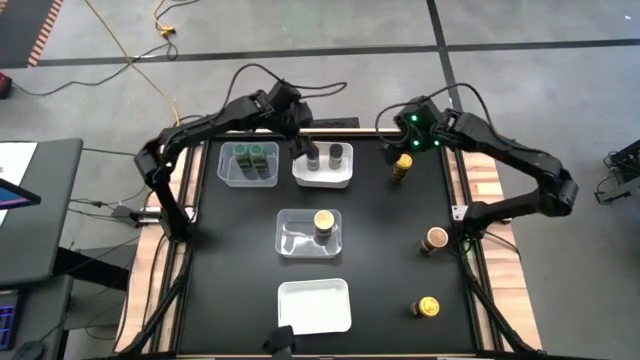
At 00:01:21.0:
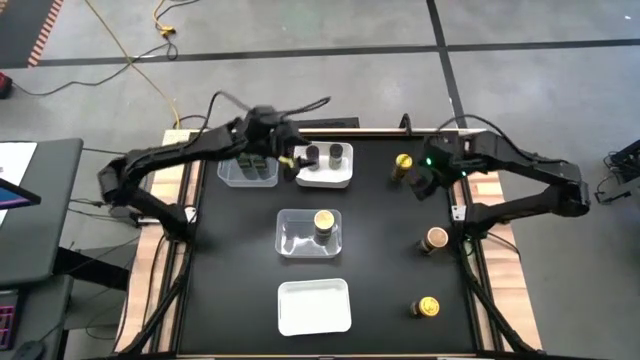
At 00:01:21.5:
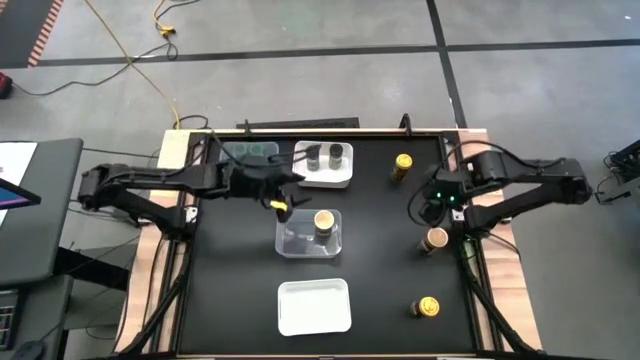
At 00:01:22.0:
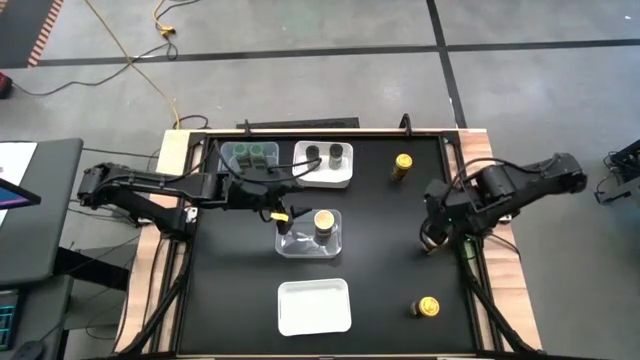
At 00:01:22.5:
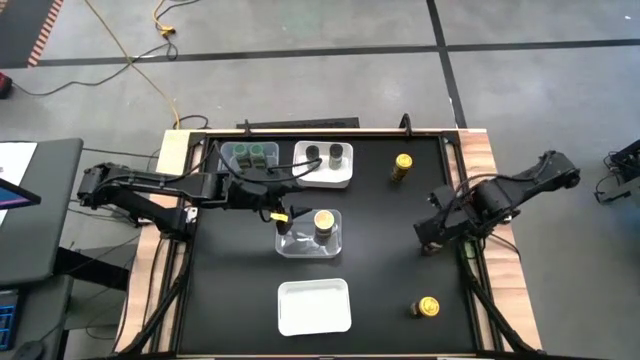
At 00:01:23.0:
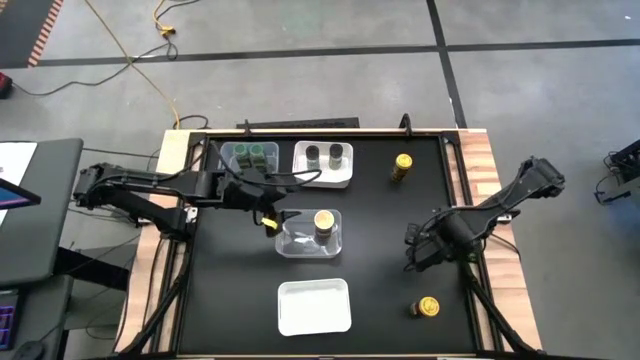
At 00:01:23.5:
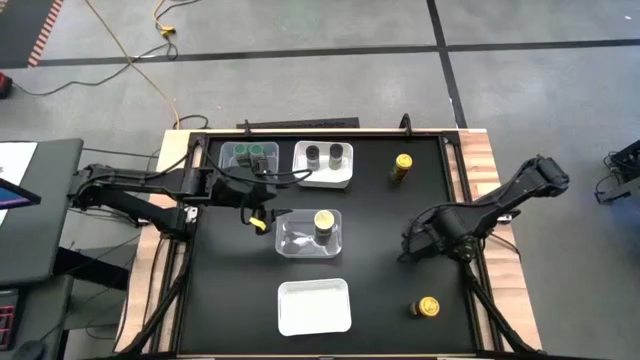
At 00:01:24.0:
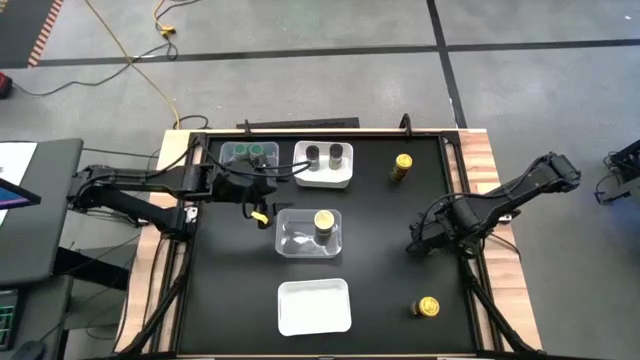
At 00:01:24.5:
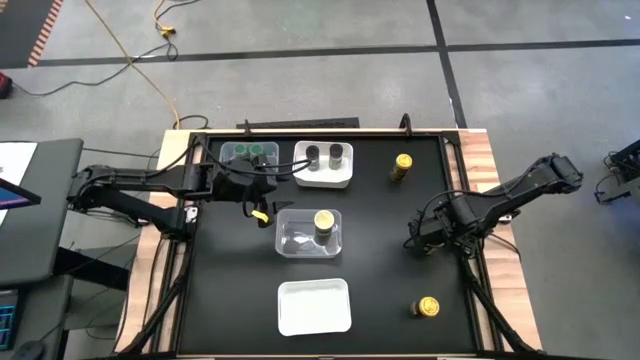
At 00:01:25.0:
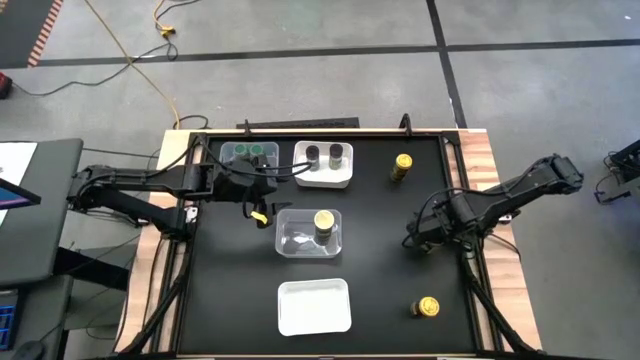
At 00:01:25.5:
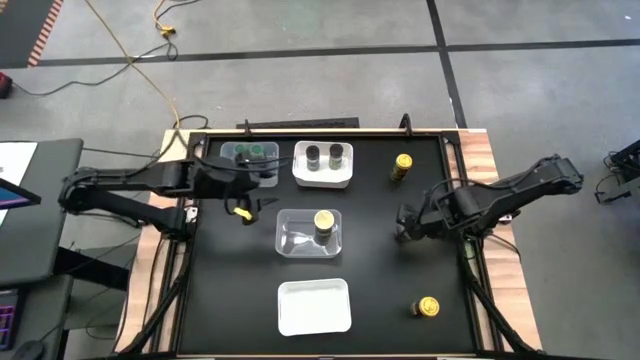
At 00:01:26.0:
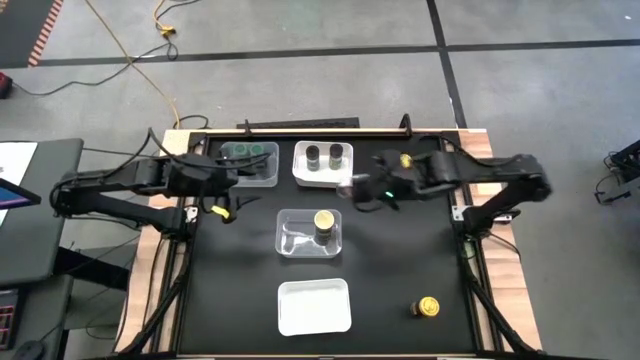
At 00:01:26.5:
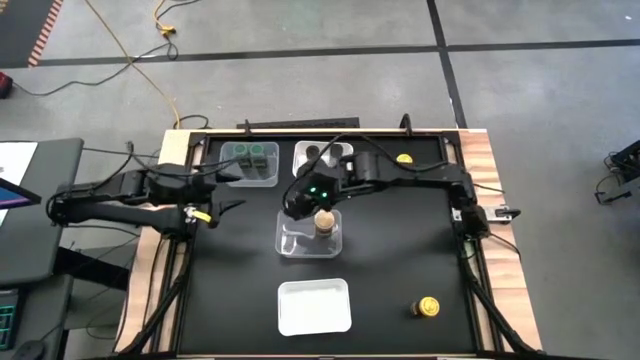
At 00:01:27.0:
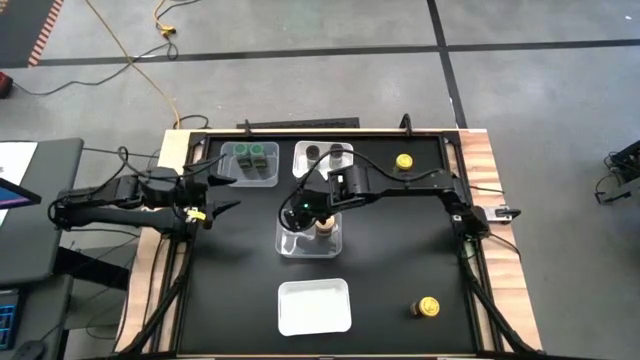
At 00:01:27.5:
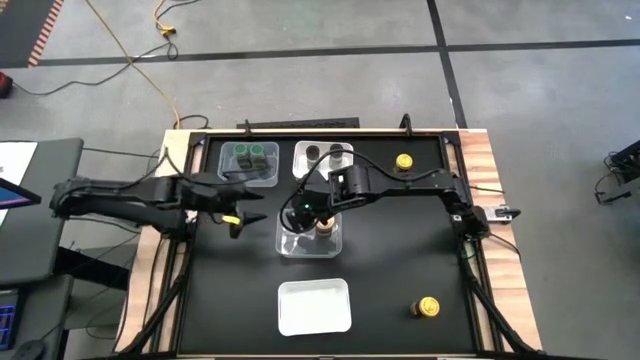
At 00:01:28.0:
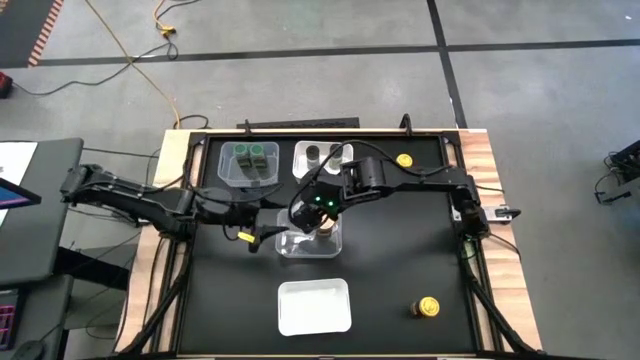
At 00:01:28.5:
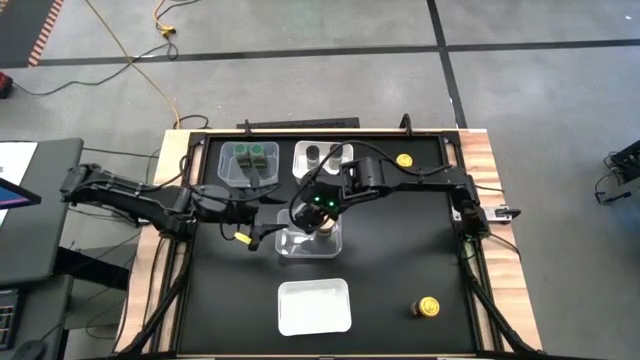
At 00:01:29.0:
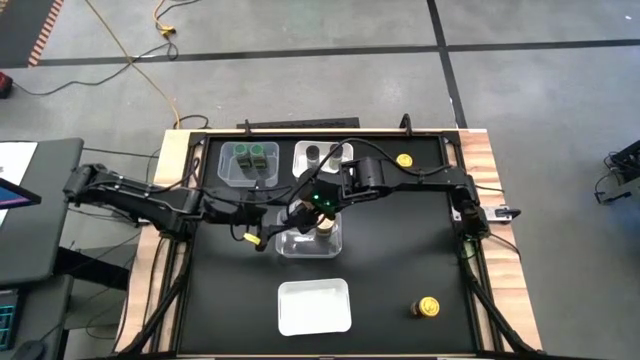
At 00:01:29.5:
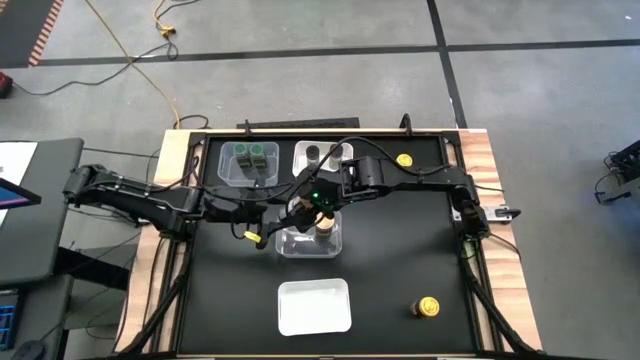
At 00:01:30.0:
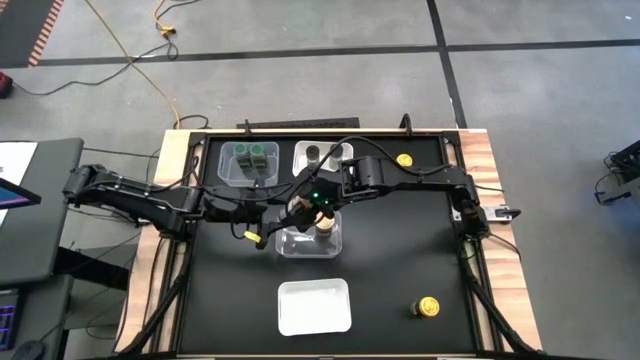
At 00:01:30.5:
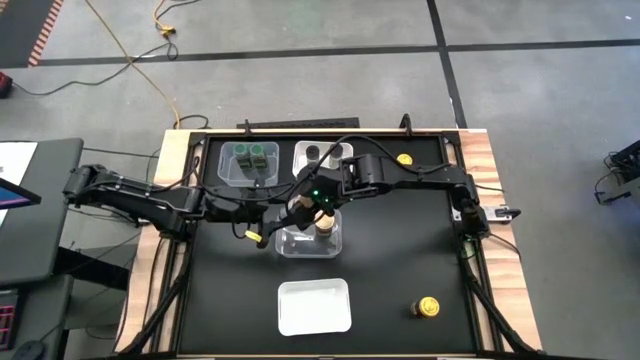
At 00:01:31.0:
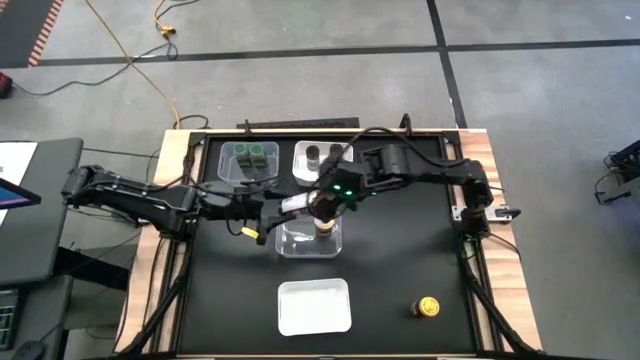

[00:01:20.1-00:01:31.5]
Task: Sort spices by type
Put the brown seasoning bottle into the center transparent bin

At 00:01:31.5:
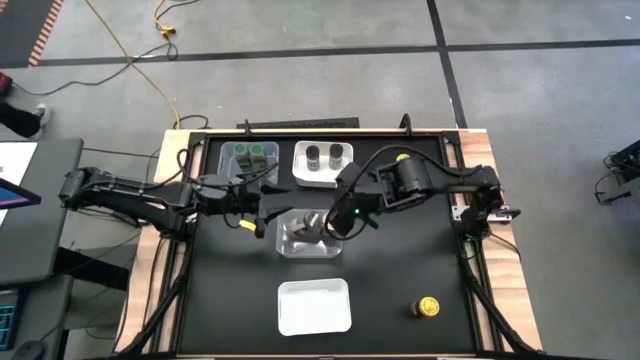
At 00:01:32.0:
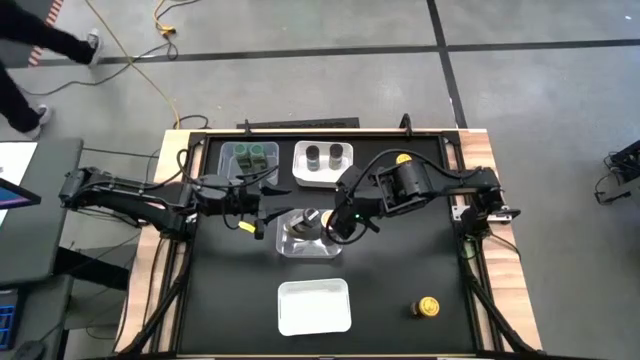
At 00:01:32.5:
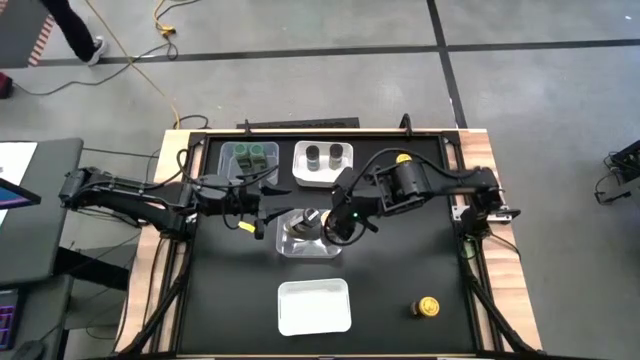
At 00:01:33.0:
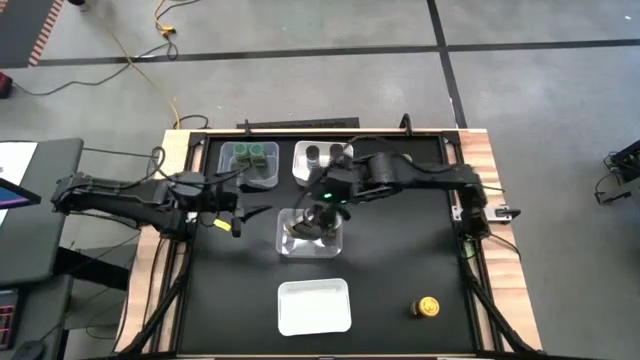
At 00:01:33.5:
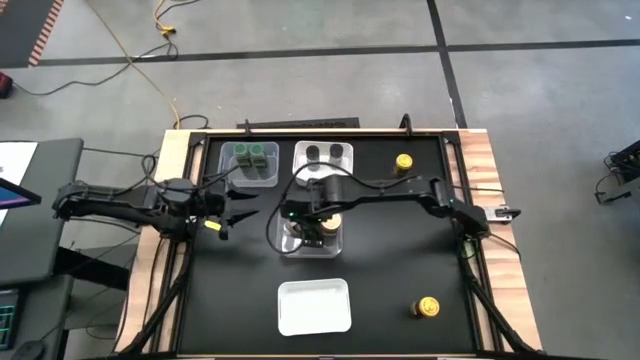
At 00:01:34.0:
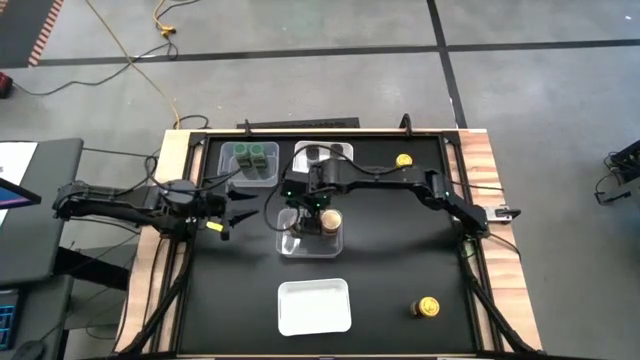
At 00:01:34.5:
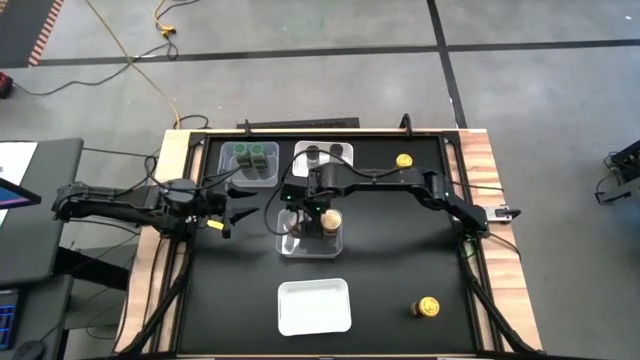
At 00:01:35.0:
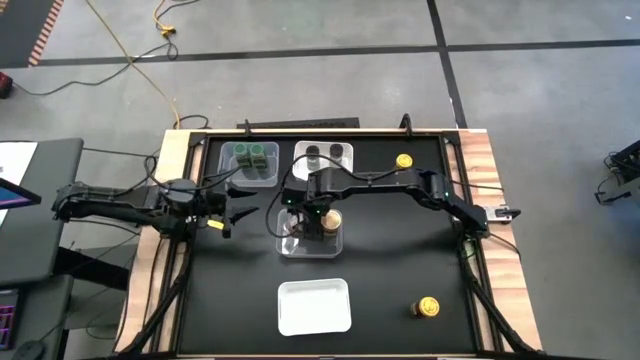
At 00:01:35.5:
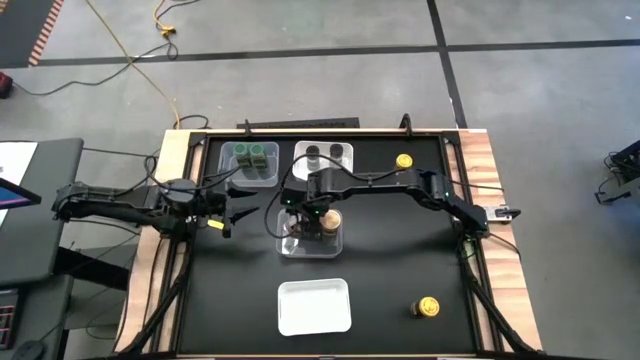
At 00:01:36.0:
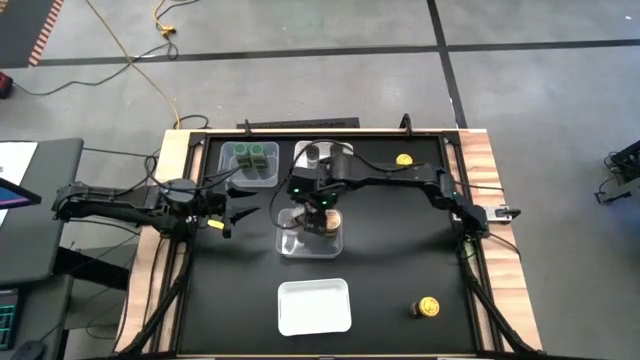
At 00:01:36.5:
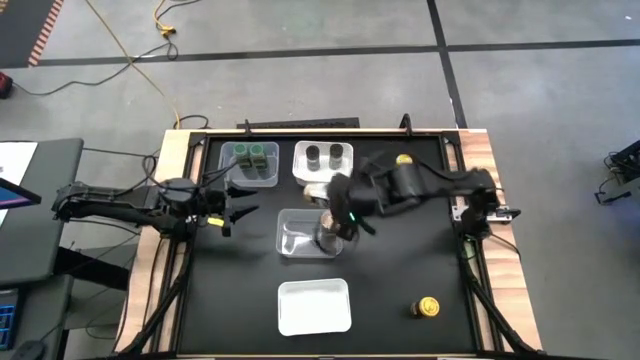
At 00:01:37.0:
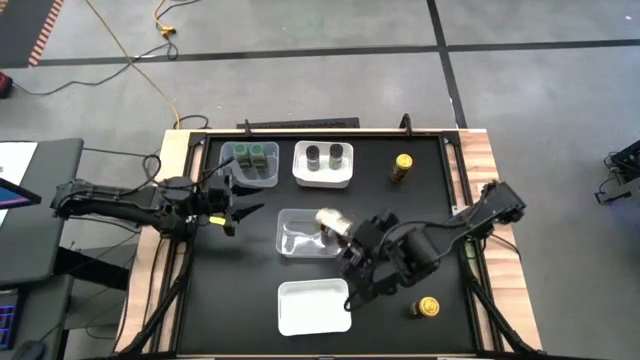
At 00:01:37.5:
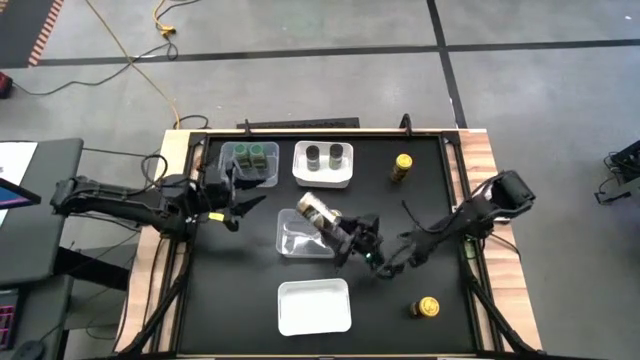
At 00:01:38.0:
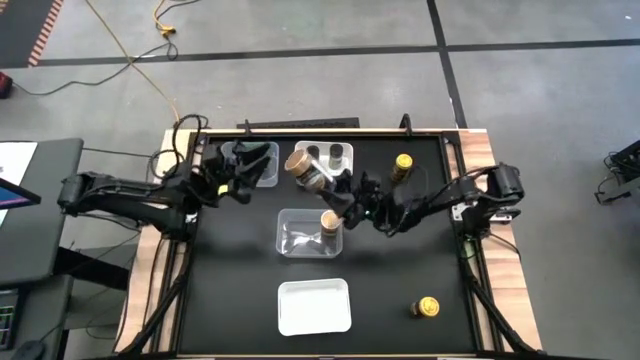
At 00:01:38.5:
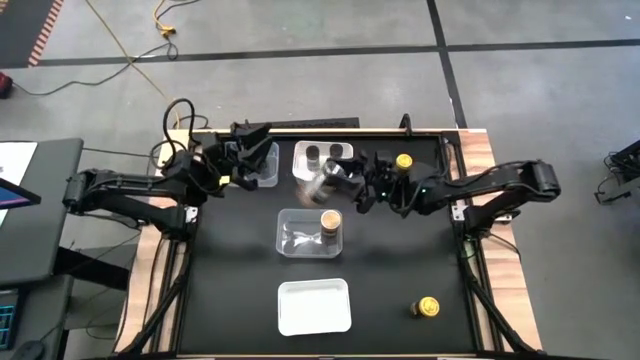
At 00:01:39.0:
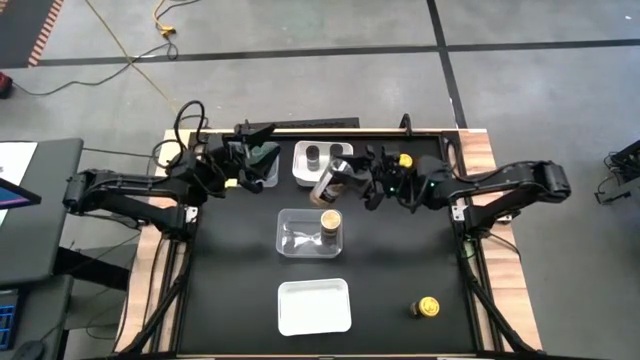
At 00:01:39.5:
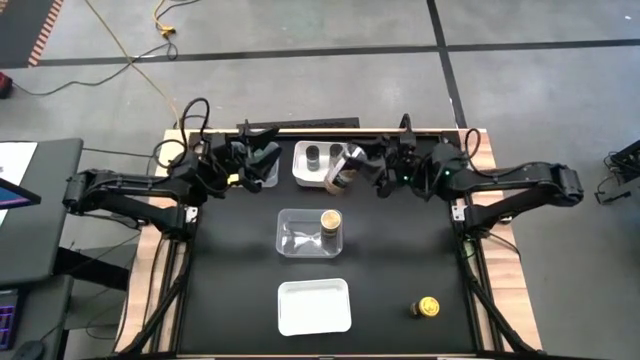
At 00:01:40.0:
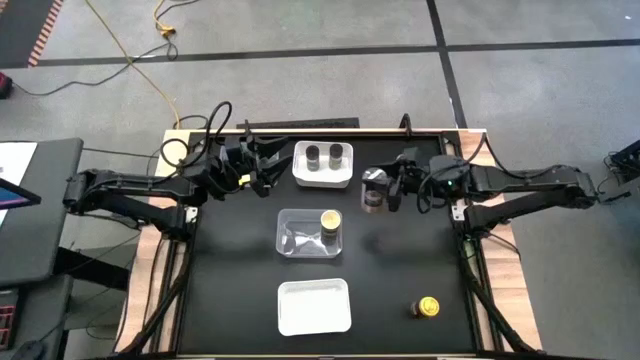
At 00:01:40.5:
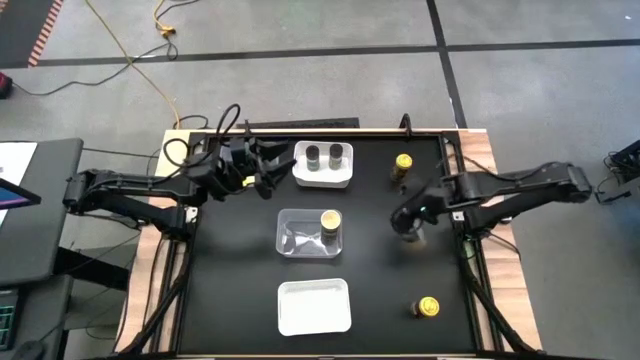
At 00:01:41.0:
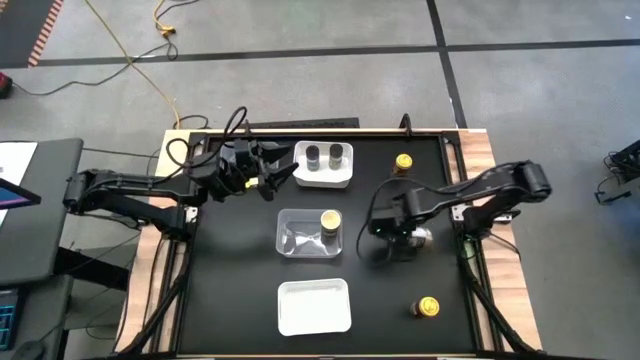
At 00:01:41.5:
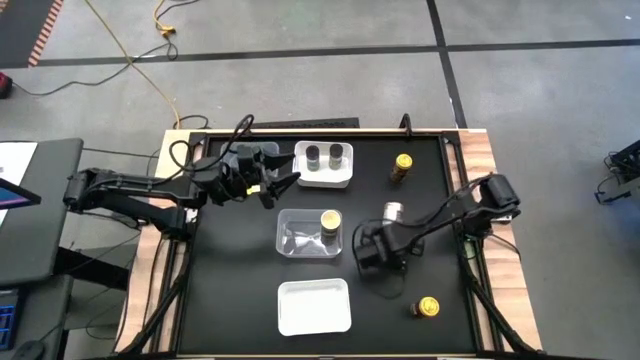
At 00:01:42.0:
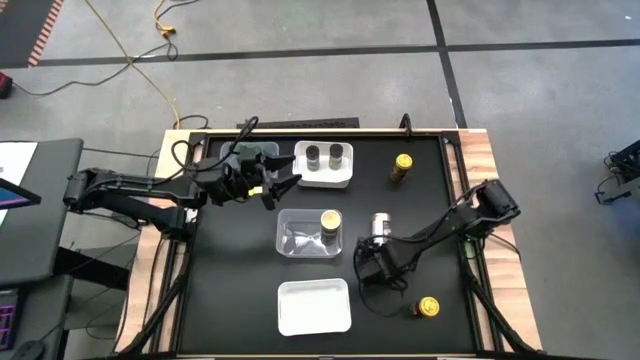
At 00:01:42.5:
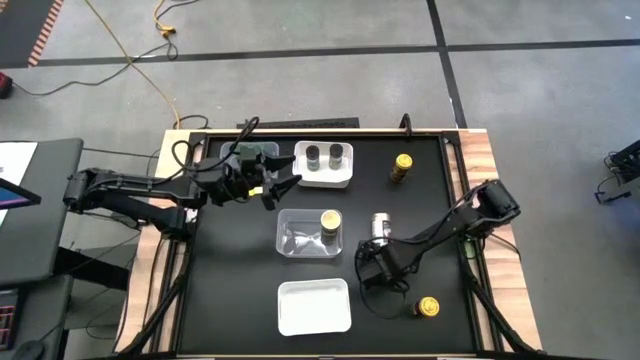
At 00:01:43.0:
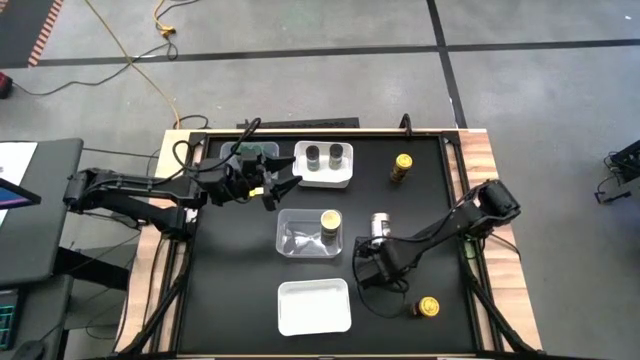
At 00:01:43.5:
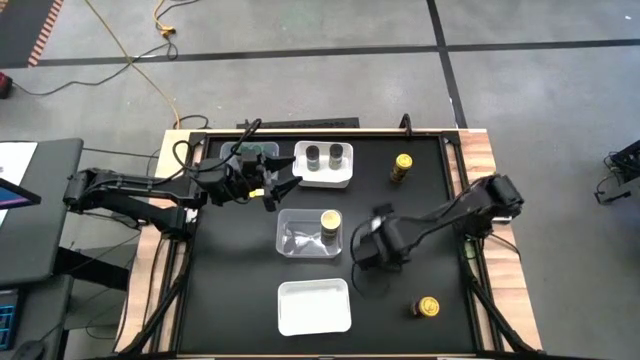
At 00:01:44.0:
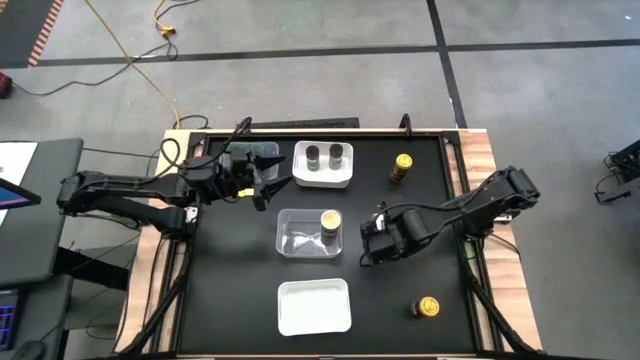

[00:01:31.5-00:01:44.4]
Put the brown seasoning bottle into the center transparent bin
